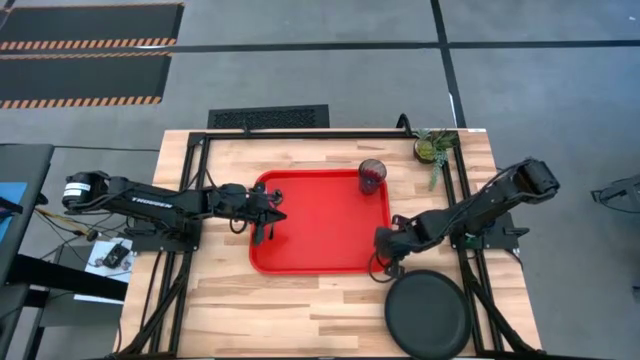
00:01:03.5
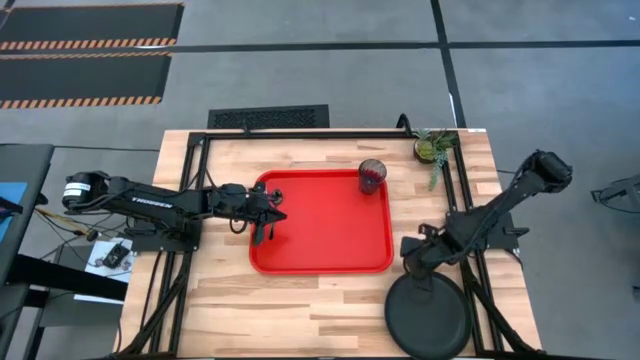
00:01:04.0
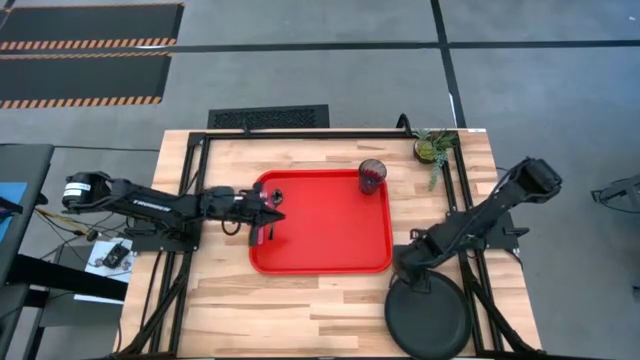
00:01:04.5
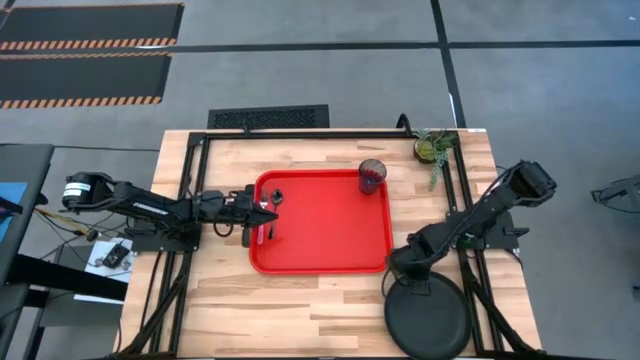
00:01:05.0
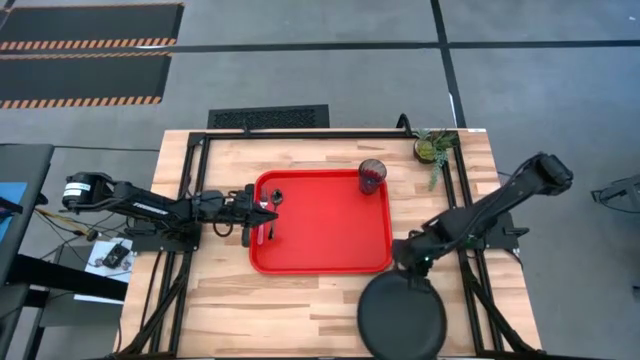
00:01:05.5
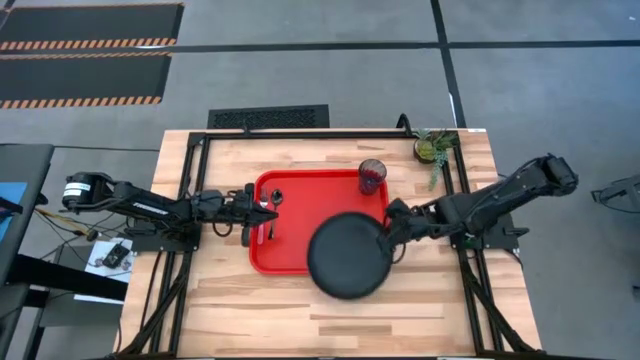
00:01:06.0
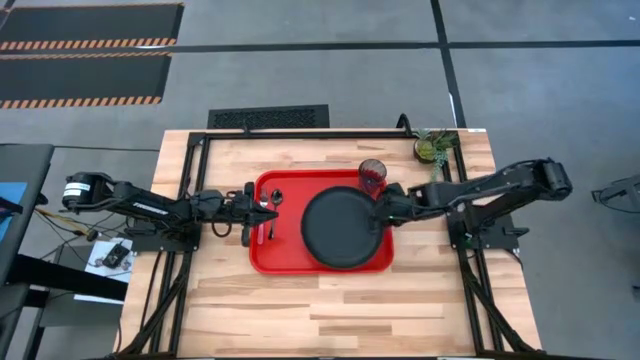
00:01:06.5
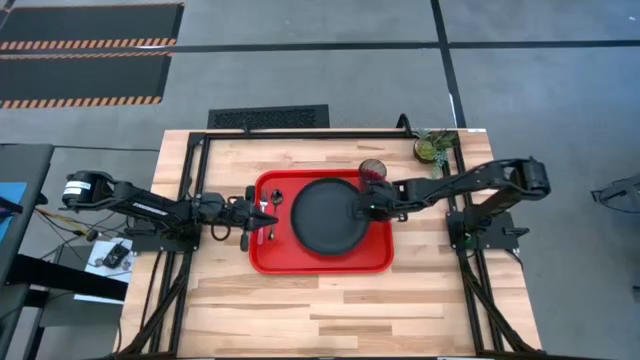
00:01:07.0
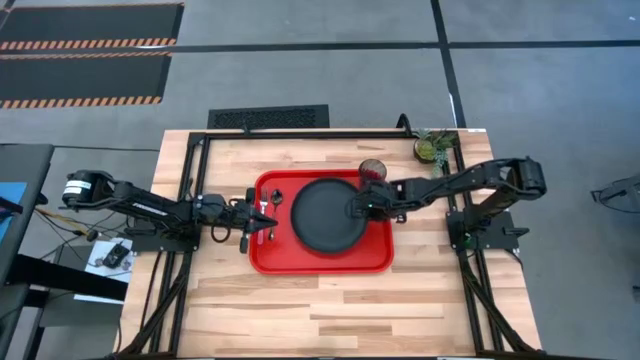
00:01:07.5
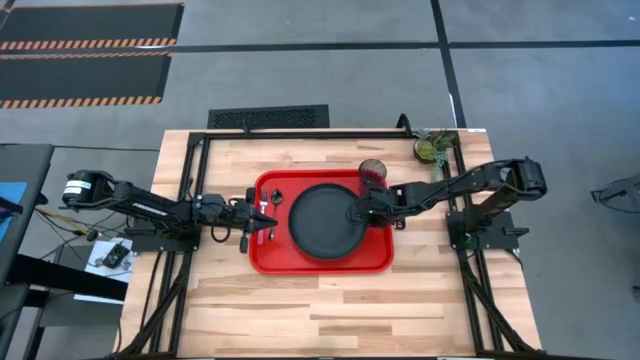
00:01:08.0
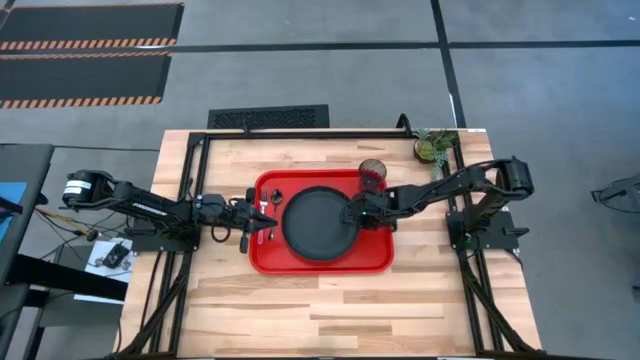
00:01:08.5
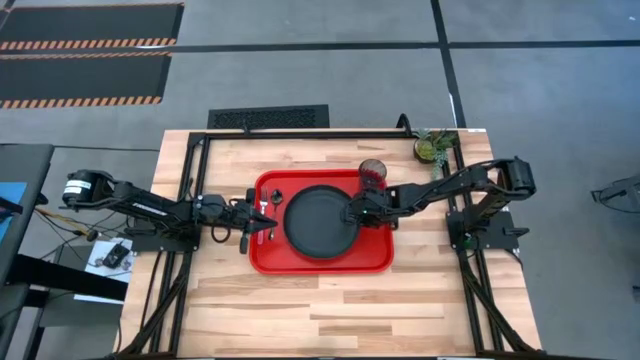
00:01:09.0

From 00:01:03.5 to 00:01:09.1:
Task: Pick and place plate/cup/fork/spoon on tray
Put the black plate on the red serving tray

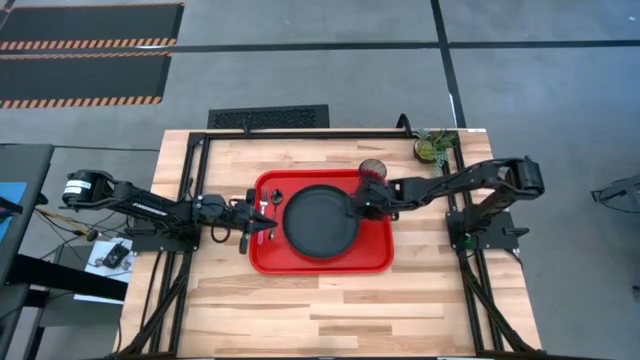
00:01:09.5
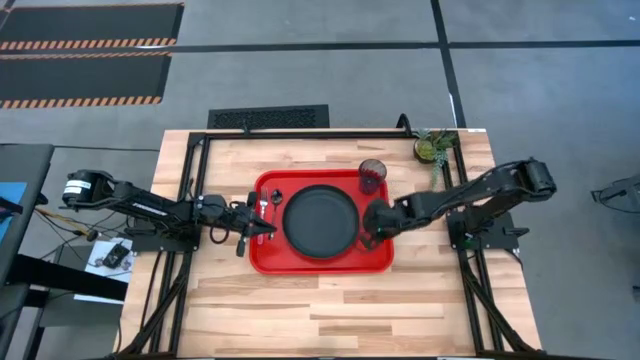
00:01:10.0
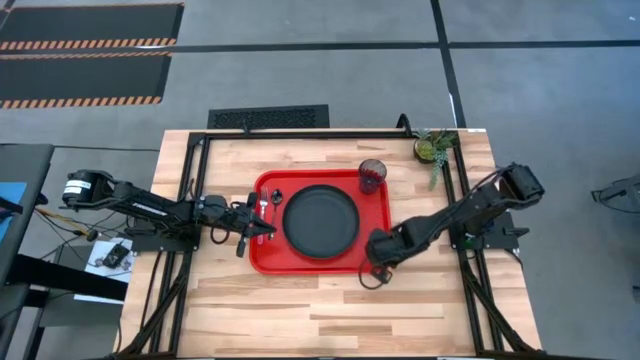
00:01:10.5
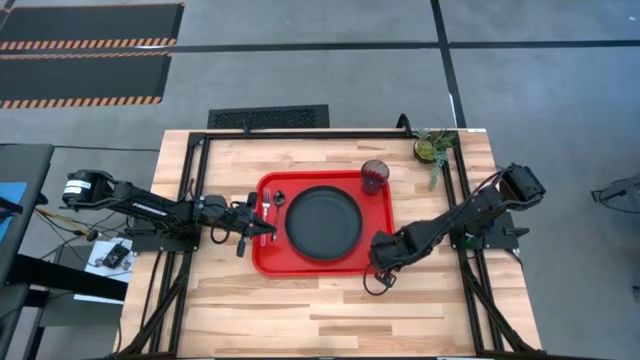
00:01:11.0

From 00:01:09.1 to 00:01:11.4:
Adjust the red serving tray

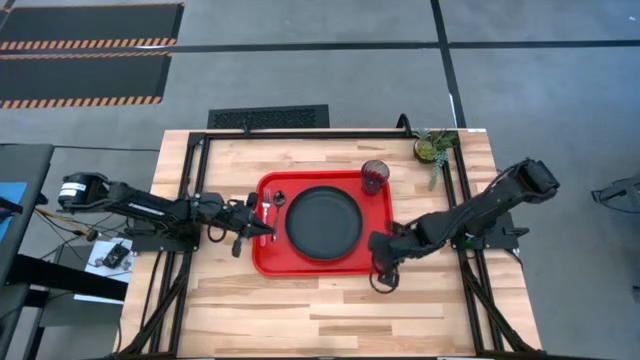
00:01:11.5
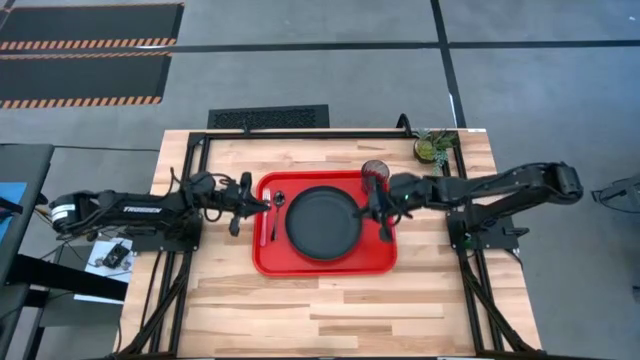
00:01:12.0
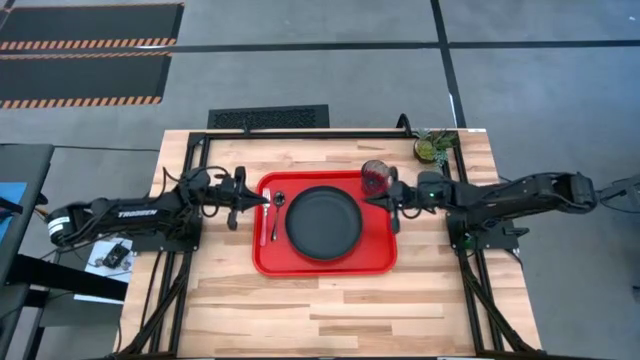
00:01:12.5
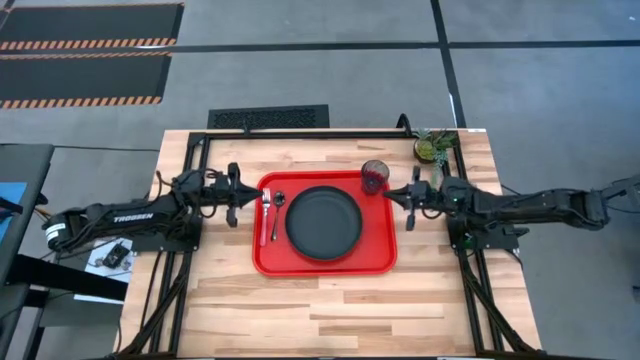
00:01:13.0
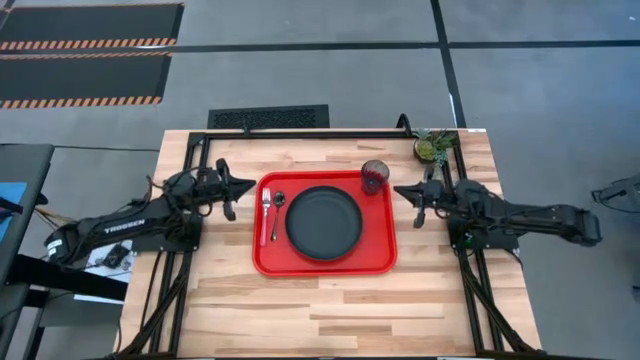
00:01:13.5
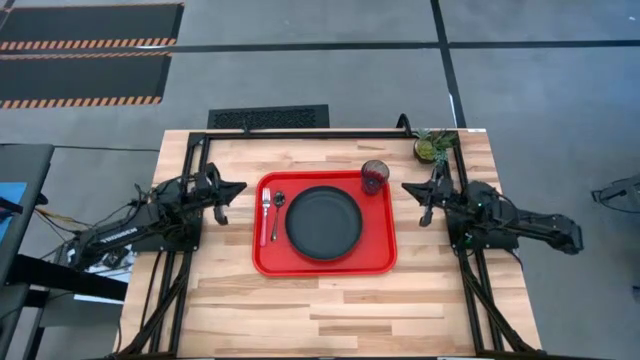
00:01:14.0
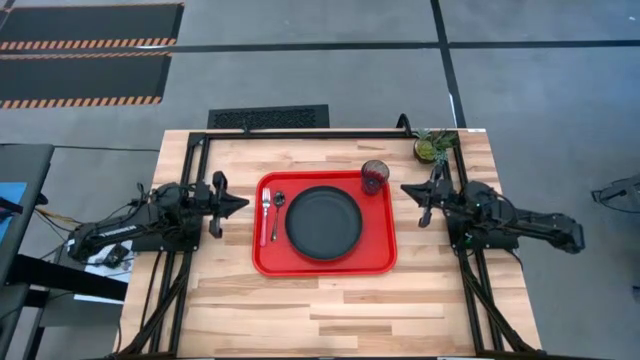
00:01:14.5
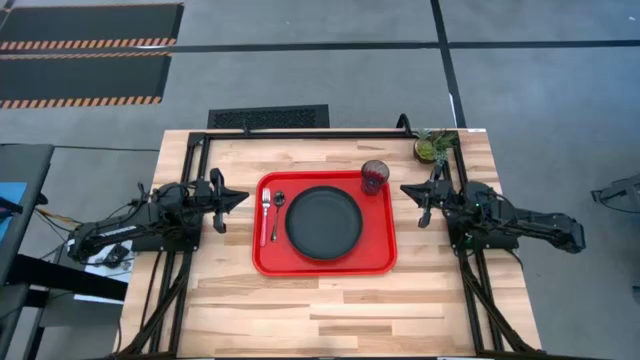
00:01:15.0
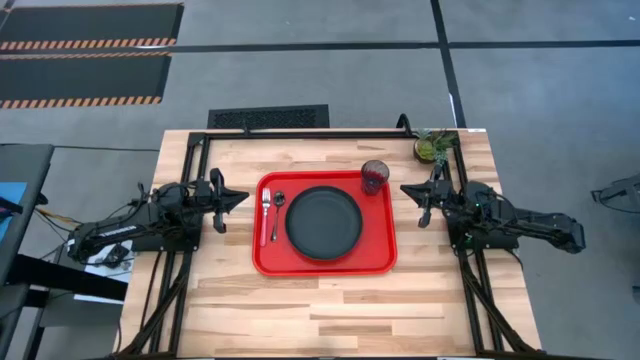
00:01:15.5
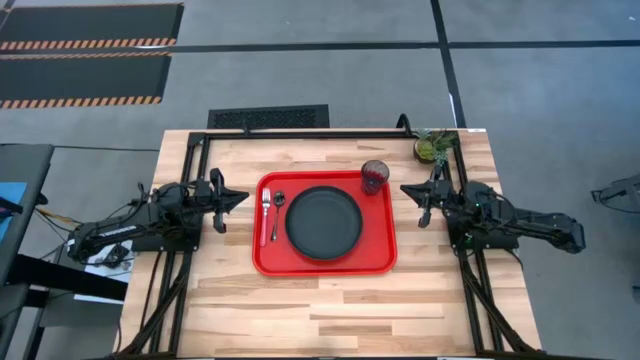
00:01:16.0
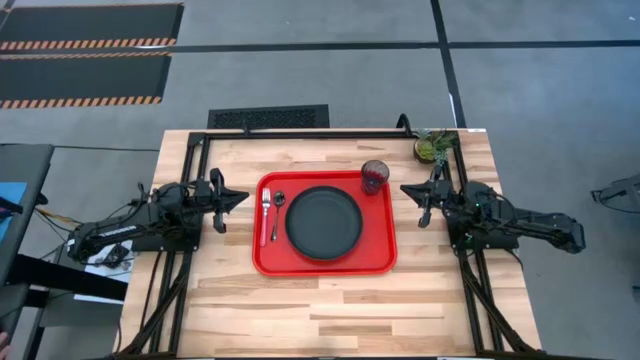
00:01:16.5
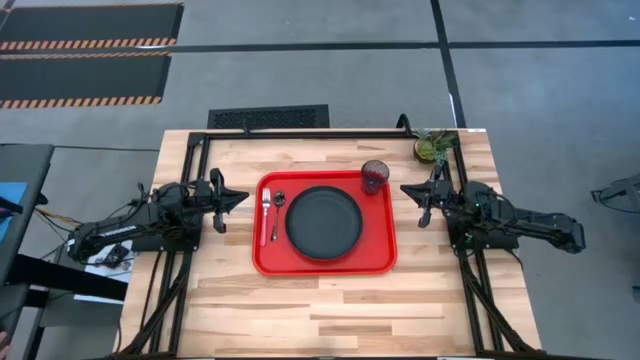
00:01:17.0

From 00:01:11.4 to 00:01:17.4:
Return To Home Position

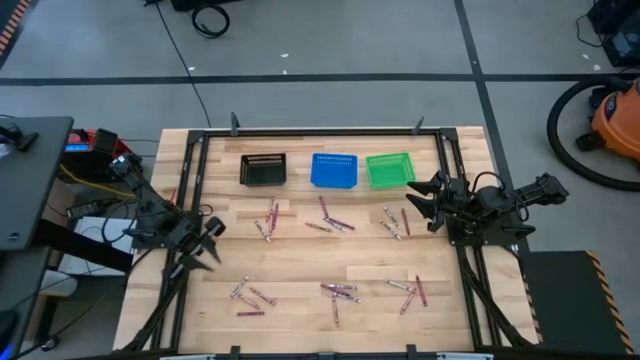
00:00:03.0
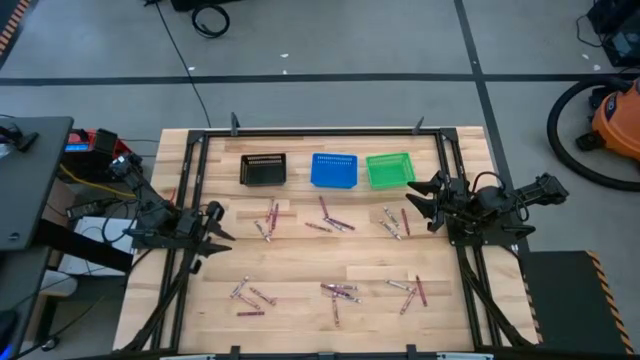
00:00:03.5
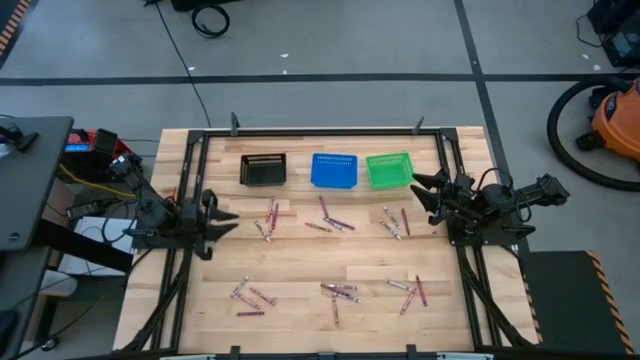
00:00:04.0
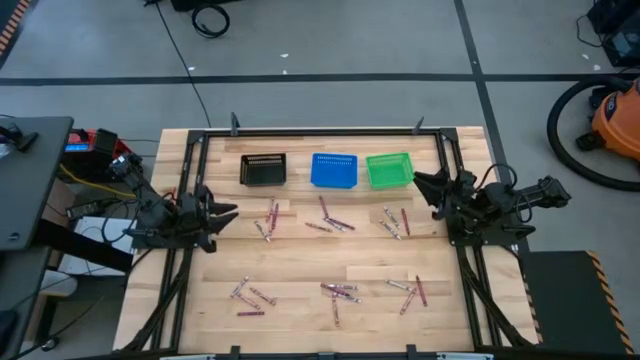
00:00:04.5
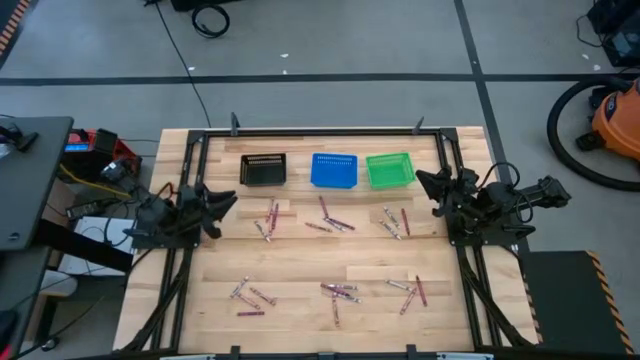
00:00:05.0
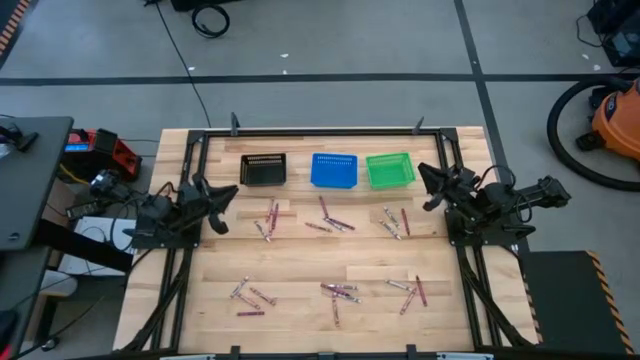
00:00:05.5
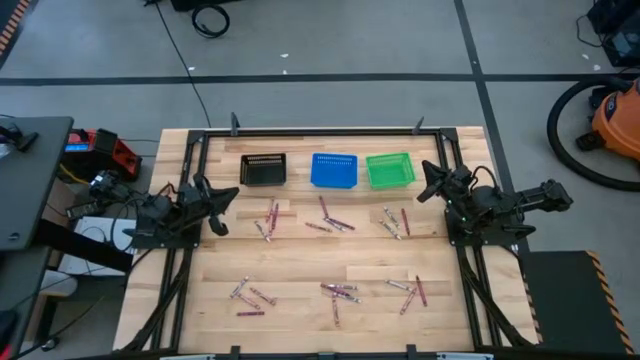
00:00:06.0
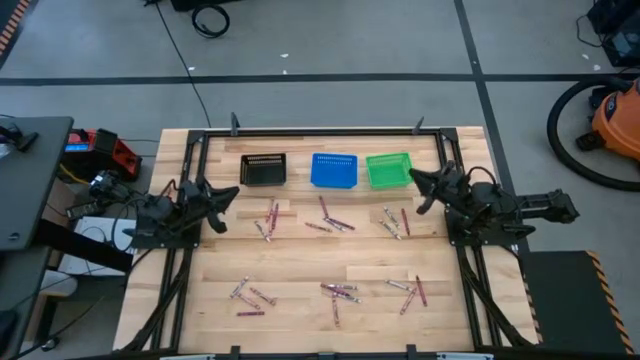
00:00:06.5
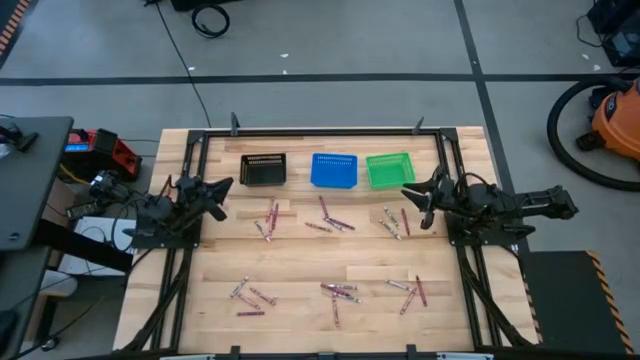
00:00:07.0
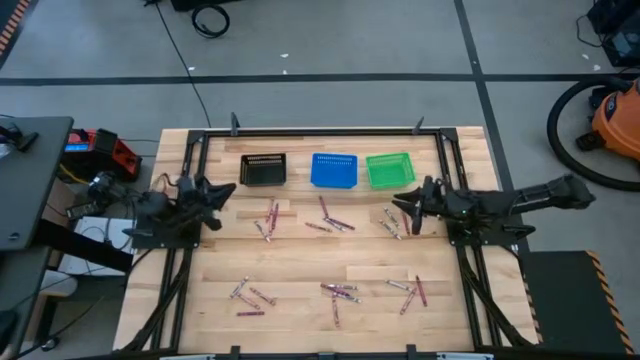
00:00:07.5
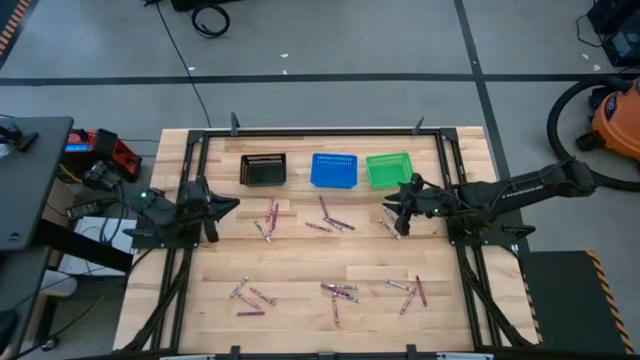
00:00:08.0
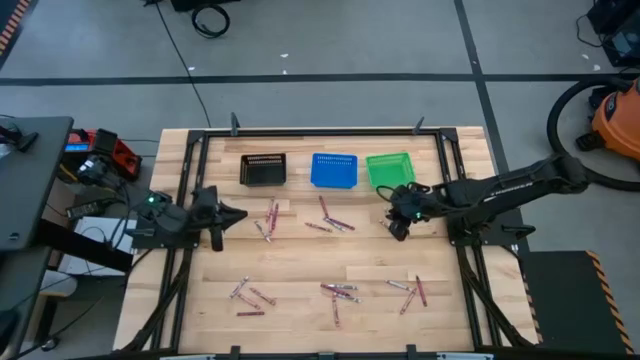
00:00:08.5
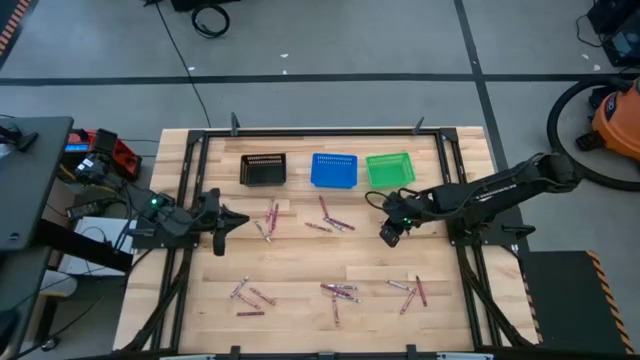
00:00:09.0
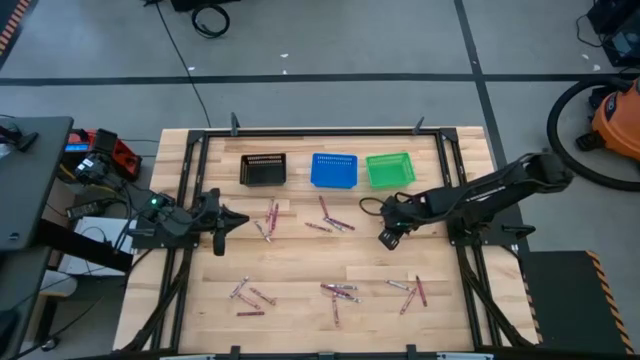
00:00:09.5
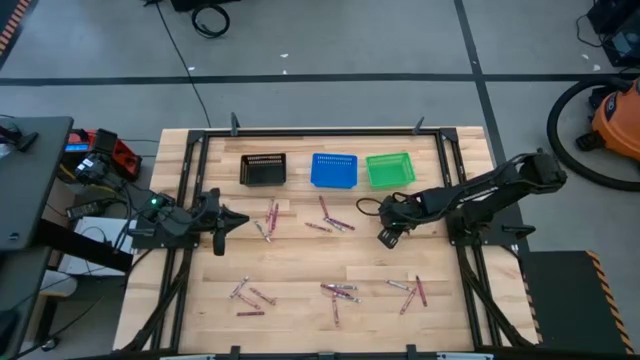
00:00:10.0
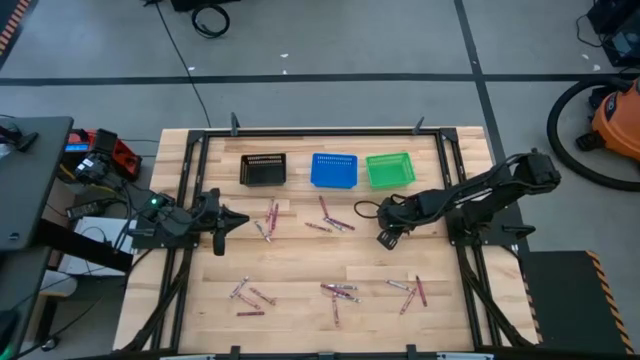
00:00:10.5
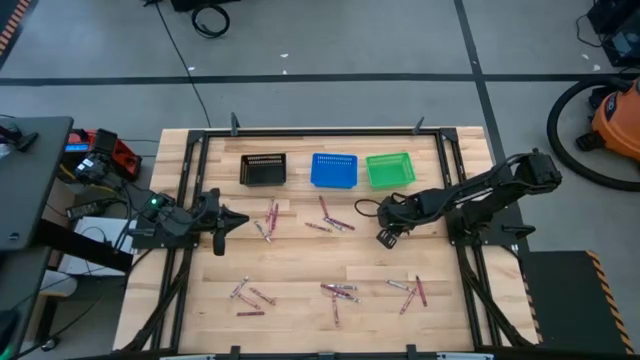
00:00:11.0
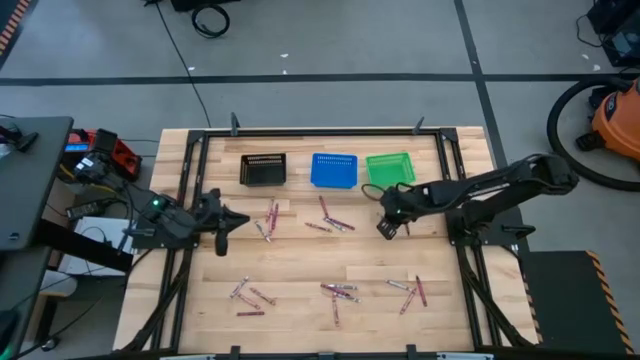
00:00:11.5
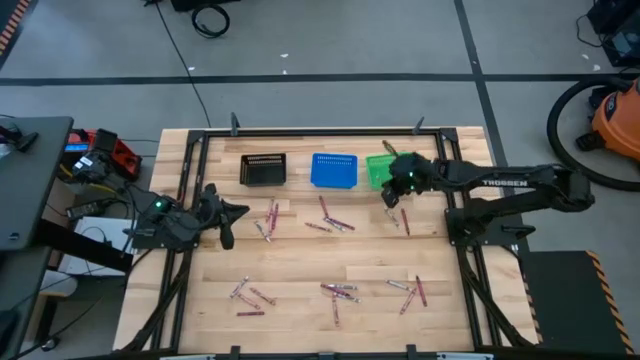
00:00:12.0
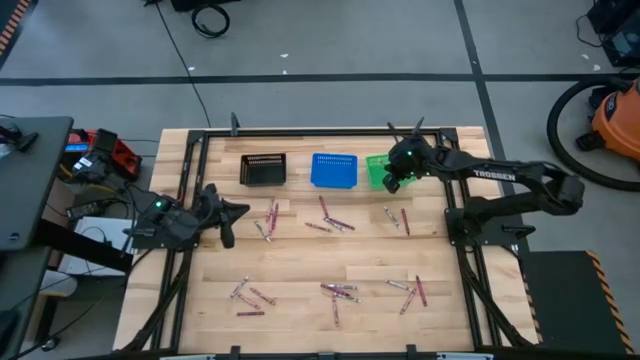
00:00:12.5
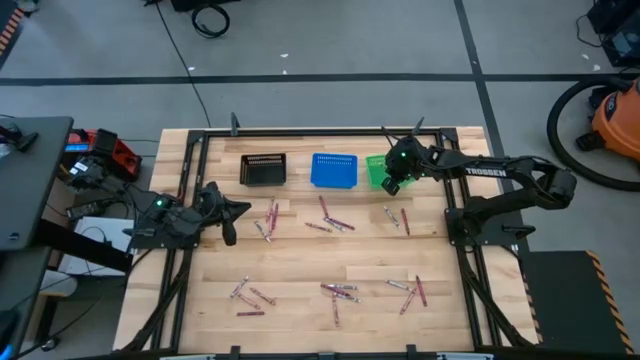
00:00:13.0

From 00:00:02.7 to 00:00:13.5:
Task: Sort crayons
Put the white crayon into the green bin
